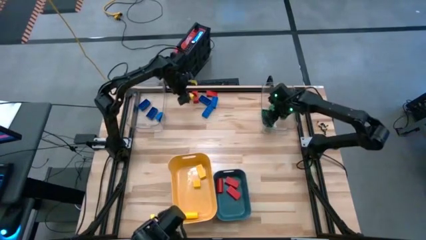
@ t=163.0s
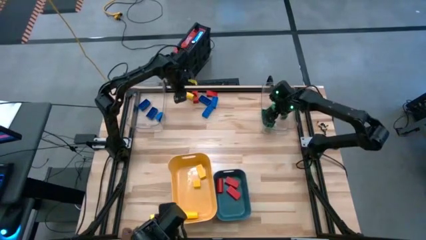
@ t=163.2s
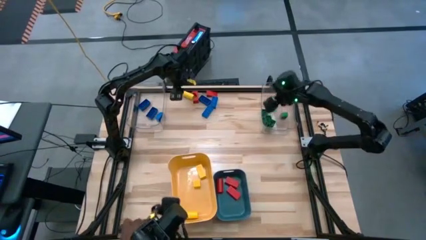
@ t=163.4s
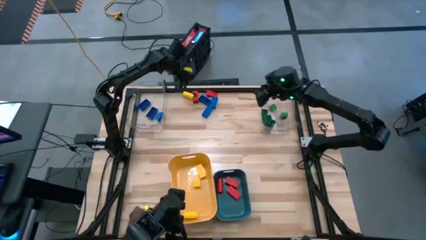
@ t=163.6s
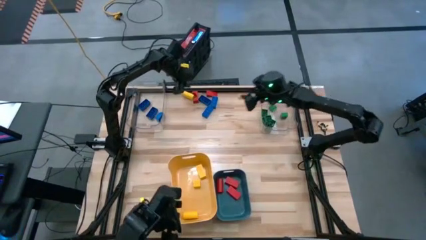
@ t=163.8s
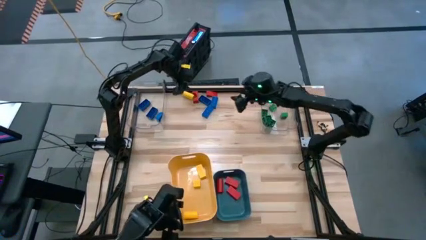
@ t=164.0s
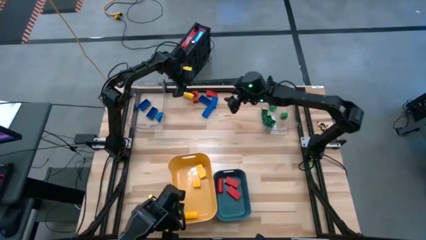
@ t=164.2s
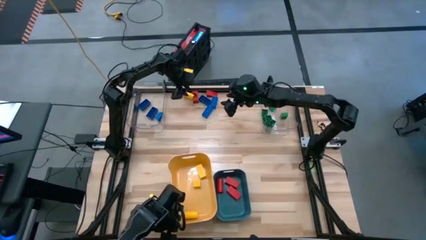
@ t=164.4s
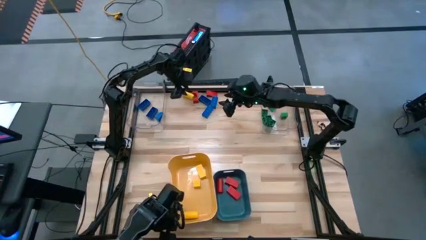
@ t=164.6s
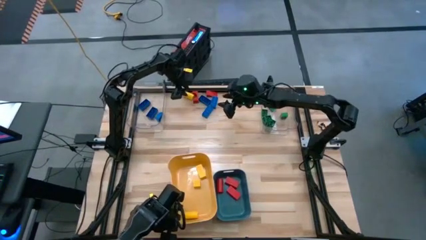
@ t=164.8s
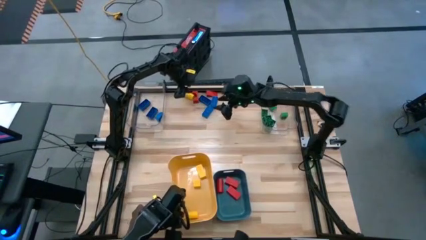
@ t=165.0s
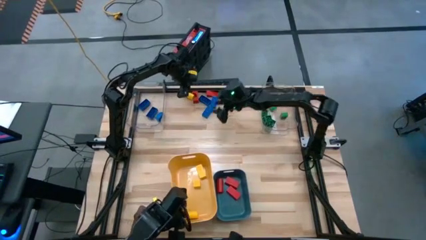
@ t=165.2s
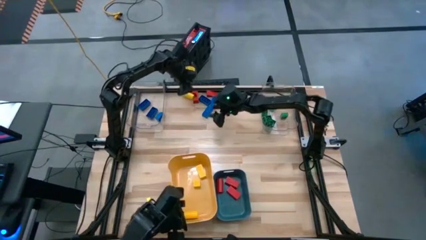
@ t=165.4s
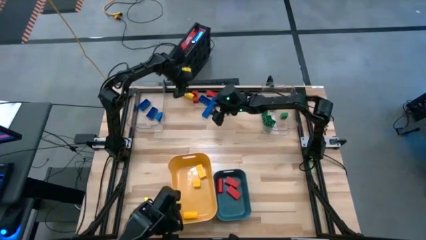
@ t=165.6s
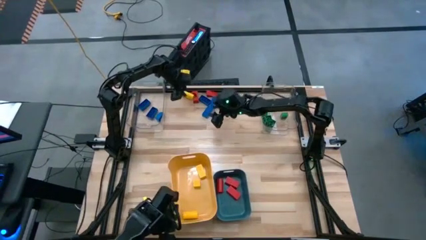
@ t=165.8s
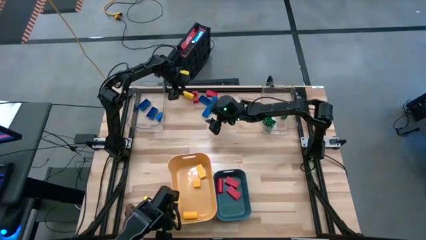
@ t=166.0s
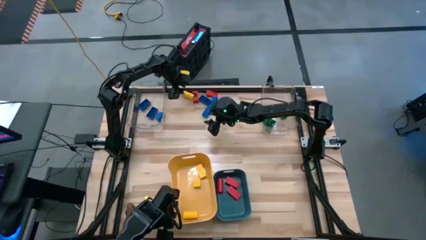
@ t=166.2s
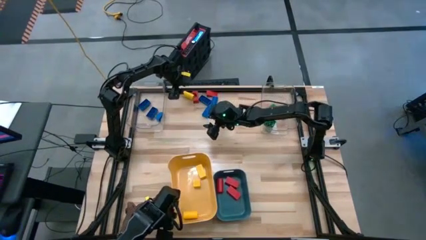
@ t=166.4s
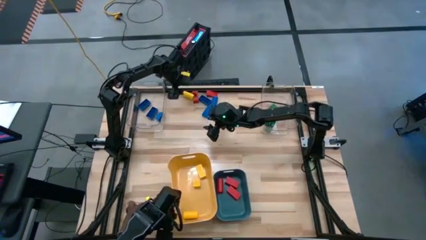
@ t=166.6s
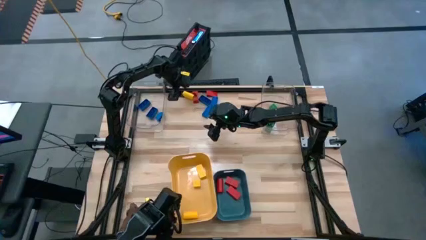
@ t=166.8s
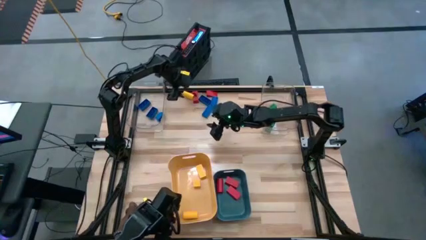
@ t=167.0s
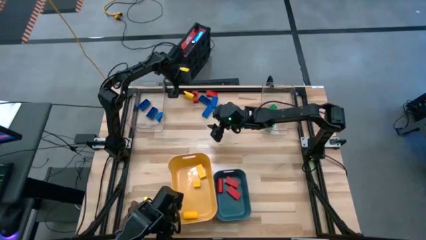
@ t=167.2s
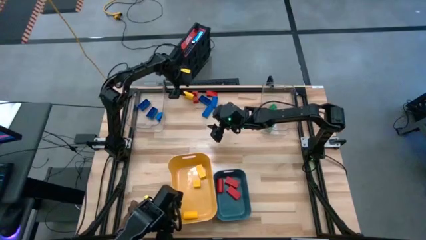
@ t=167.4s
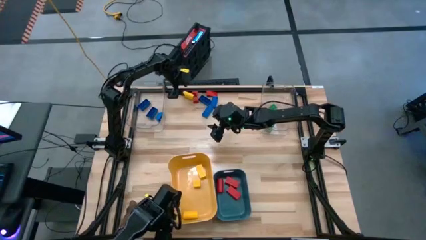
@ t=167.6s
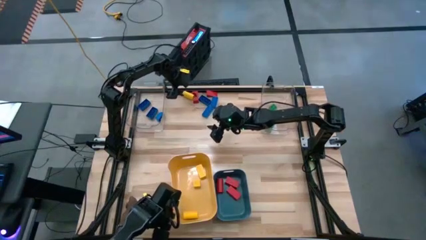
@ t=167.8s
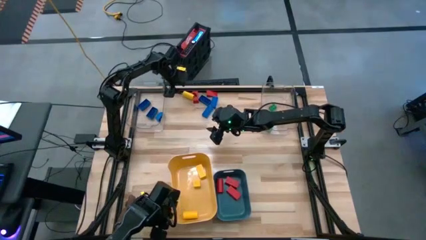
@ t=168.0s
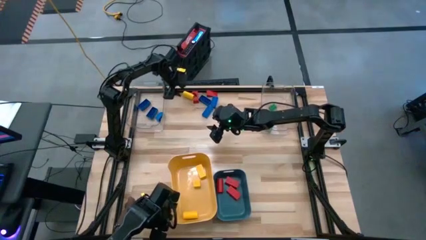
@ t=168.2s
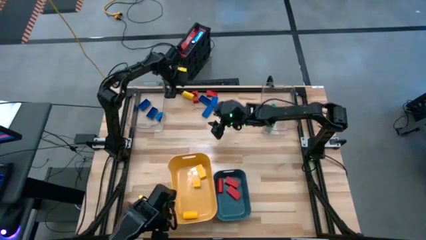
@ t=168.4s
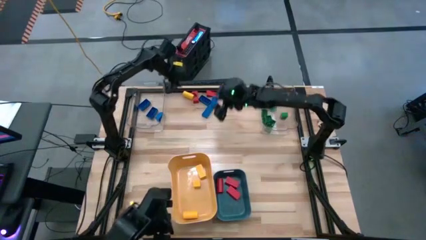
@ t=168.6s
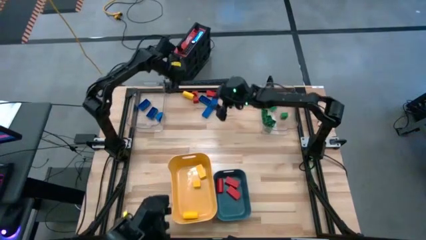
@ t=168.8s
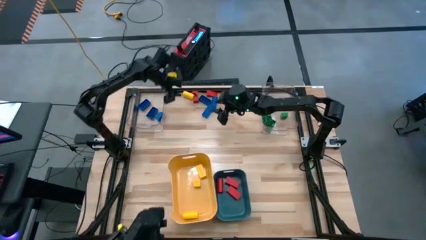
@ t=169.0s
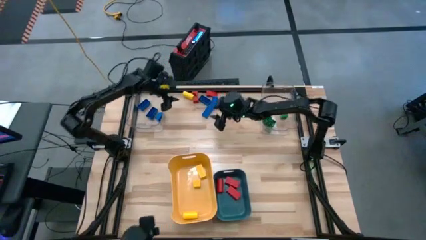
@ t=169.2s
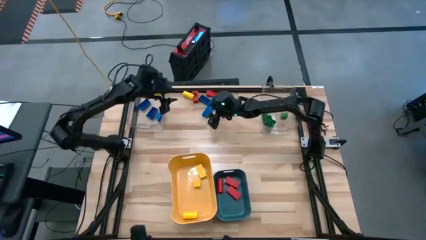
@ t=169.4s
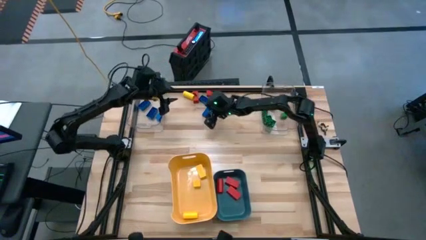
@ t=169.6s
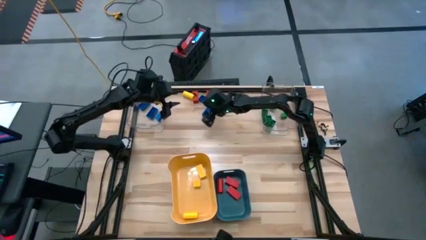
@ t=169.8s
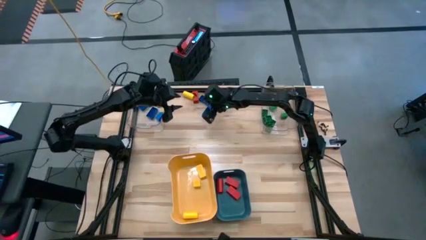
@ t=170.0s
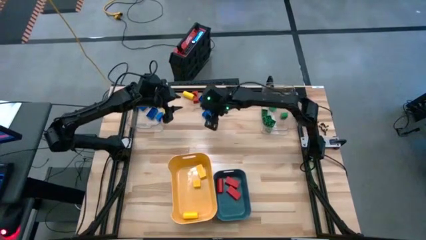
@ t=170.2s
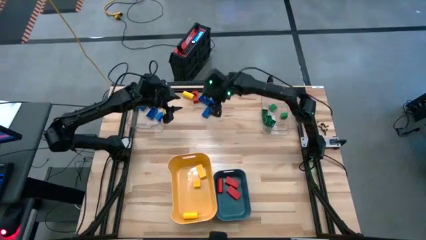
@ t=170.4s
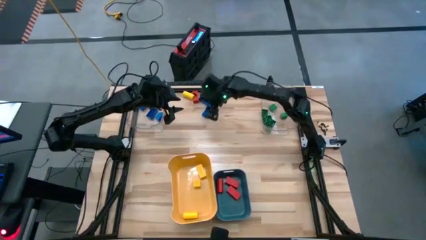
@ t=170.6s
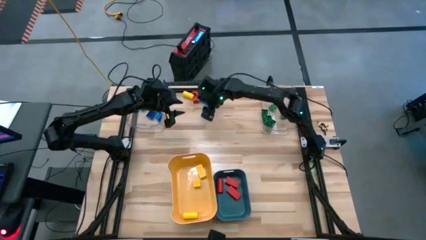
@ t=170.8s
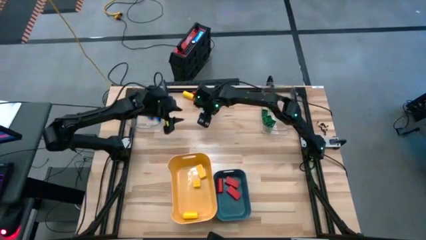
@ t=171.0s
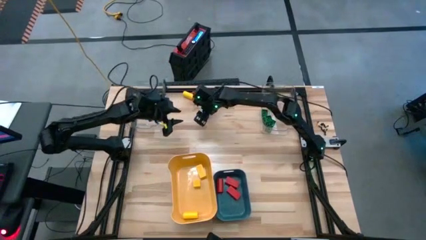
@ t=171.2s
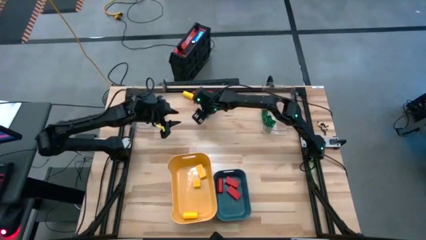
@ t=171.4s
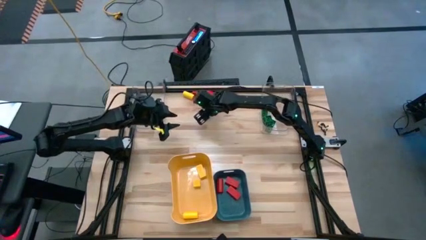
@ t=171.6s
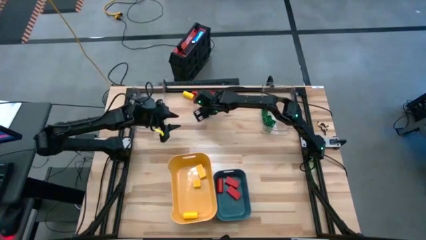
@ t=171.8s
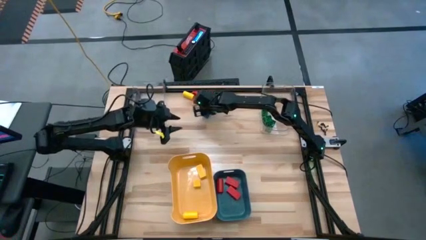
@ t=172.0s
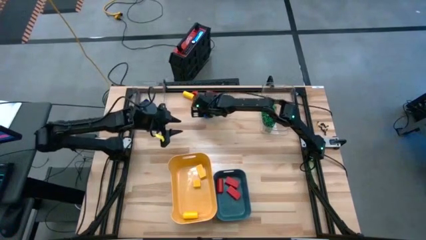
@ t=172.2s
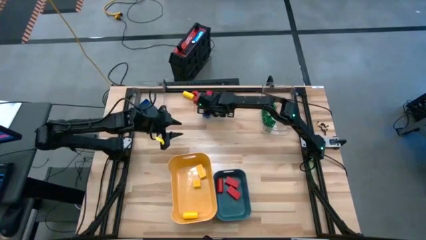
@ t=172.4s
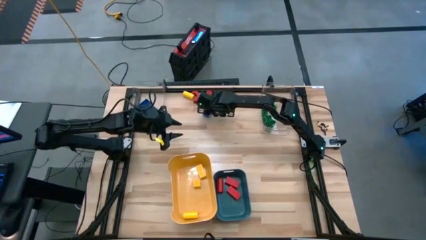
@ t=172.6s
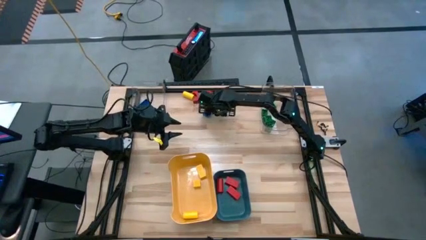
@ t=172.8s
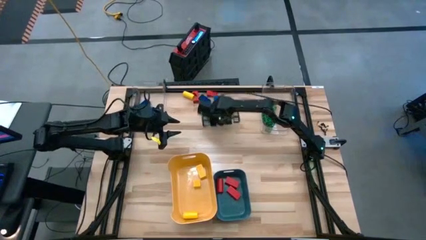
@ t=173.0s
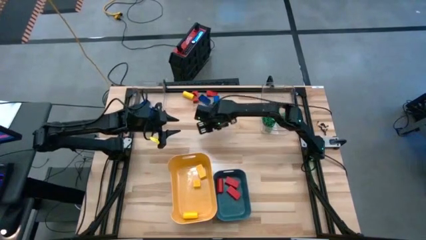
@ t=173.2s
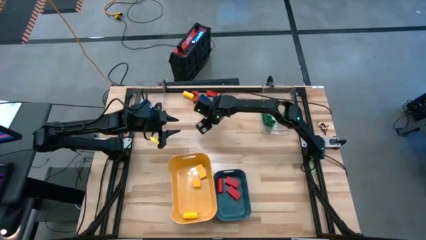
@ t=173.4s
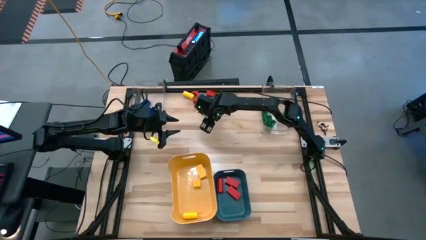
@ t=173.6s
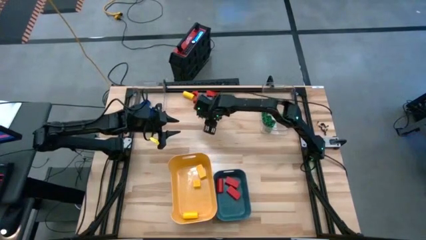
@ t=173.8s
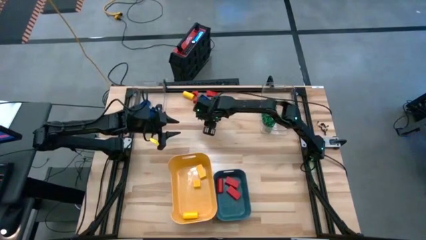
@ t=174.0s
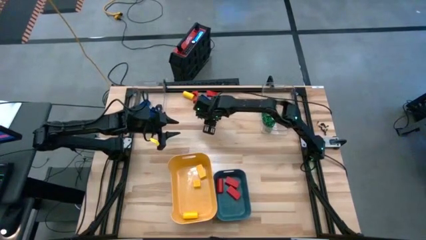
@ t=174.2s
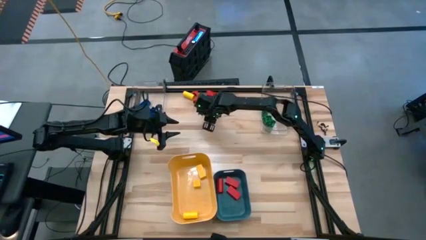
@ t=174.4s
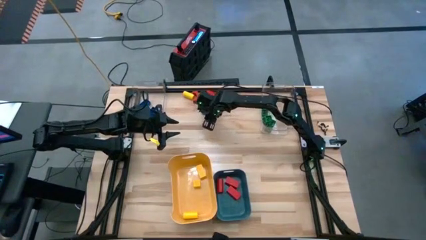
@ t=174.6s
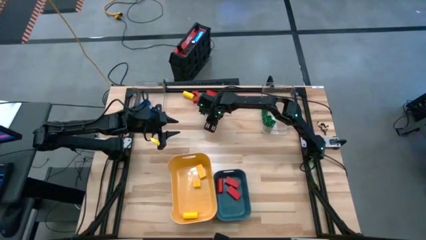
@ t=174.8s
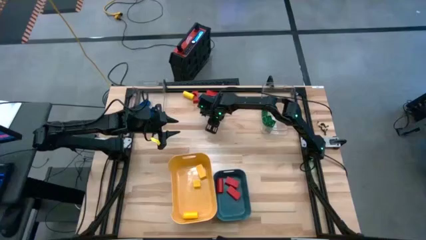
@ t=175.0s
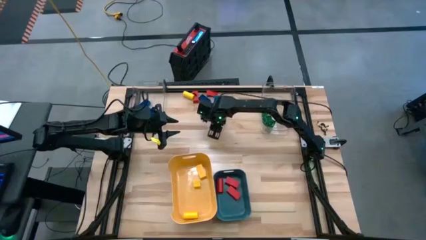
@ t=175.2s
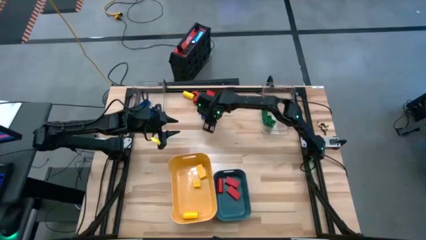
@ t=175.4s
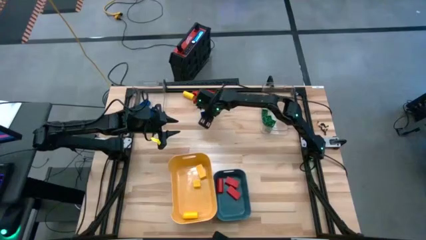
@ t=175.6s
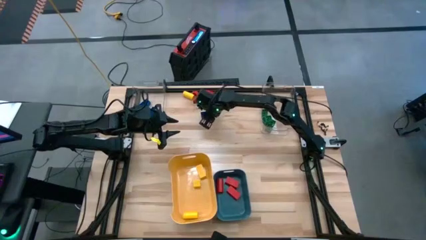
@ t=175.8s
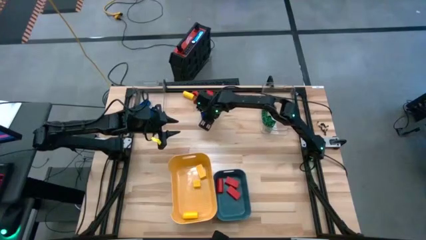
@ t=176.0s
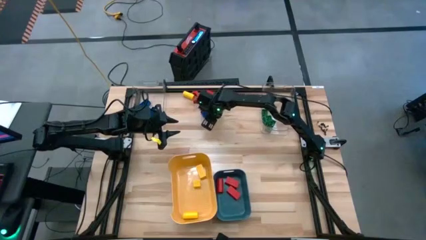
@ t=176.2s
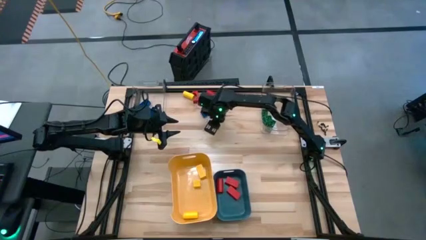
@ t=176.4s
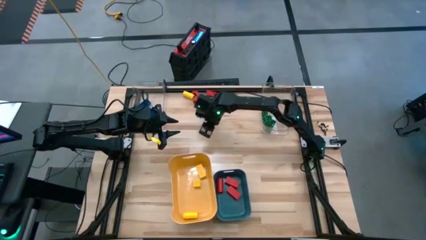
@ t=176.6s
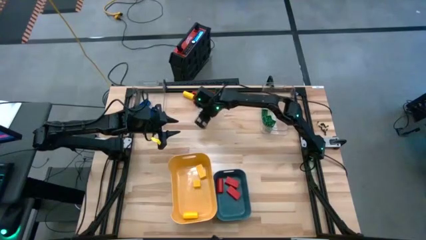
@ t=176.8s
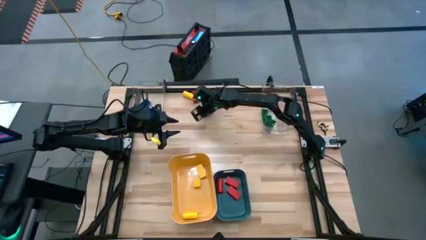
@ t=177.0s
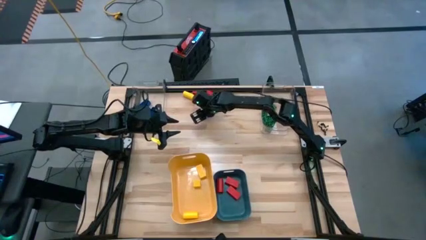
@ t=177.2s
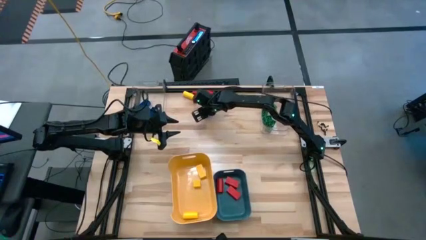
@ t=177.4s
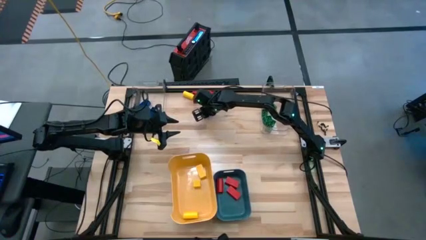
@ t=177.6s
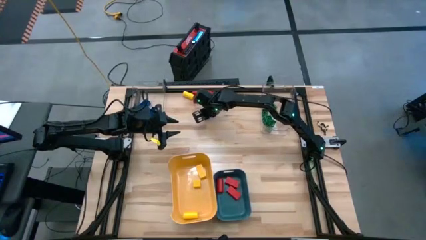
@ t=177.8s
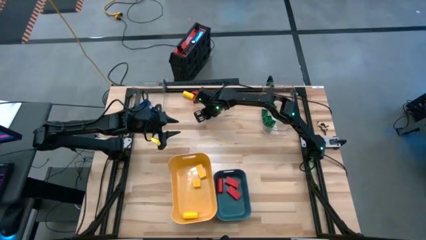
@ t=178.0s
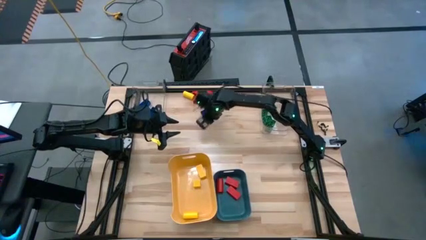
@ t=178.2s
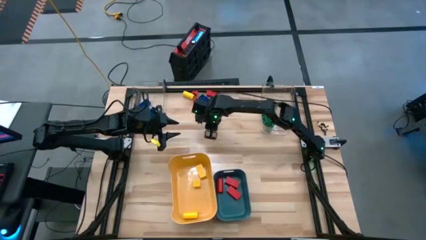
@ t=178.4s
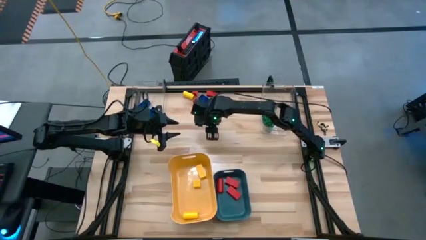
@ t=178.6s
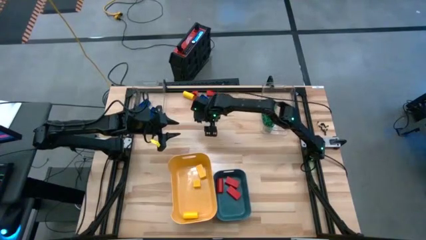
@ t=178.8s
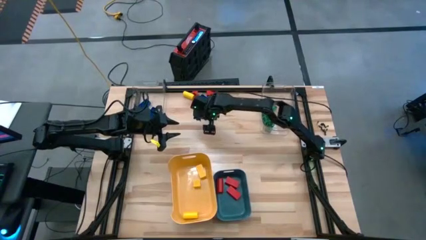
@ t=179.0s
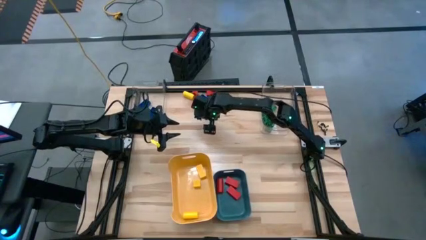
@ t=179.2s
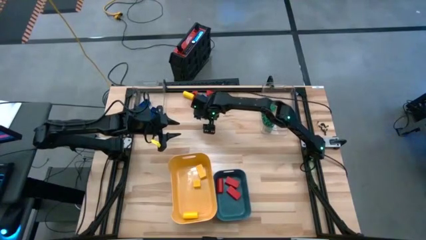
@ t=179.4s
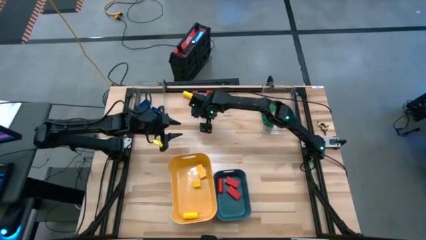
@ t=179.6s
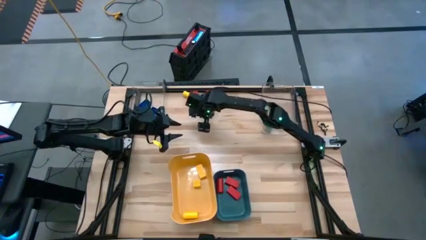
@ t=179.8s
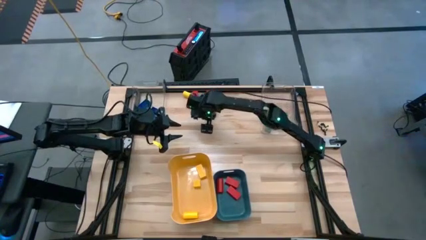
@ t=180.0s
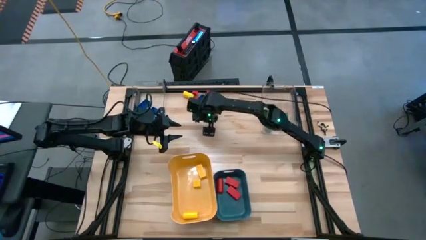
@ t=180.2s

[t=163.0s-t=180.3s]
Task: Sort blocks
Put the blue game piece into the left transparent bin
